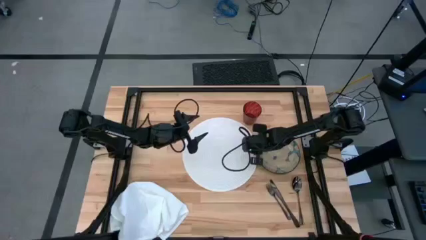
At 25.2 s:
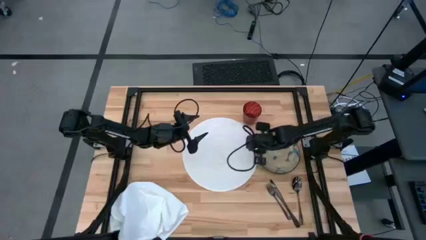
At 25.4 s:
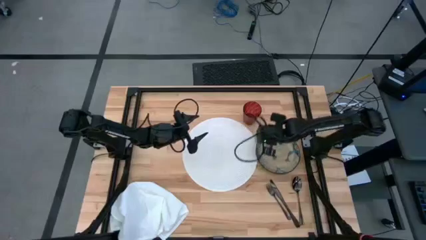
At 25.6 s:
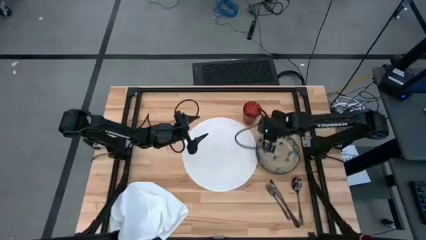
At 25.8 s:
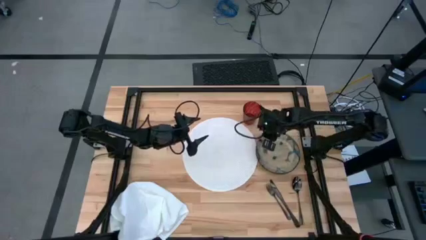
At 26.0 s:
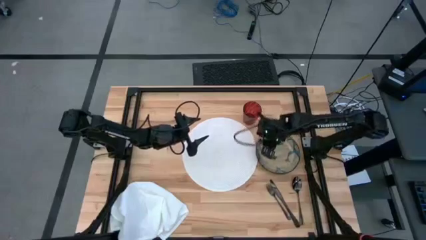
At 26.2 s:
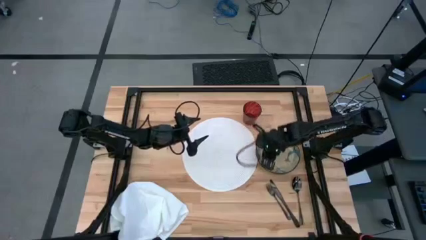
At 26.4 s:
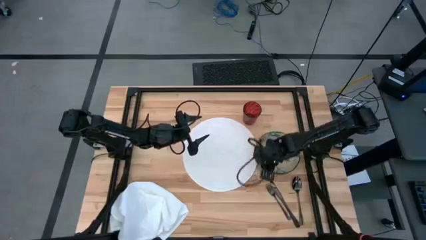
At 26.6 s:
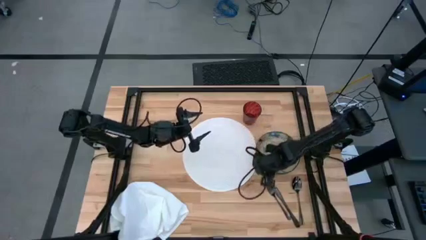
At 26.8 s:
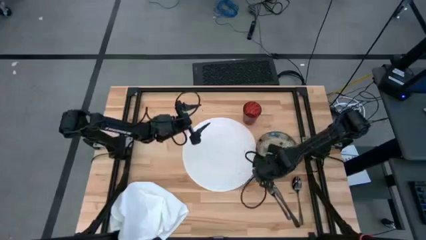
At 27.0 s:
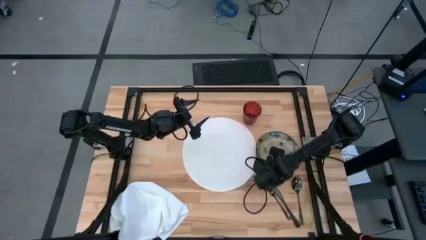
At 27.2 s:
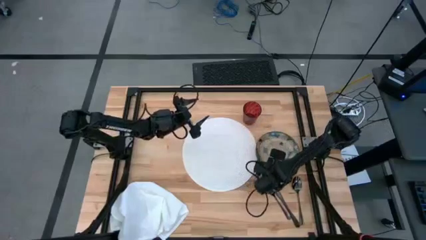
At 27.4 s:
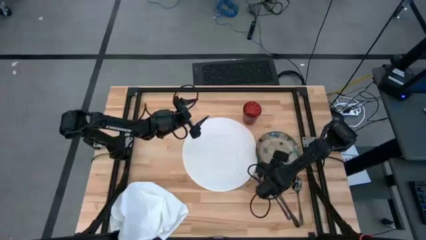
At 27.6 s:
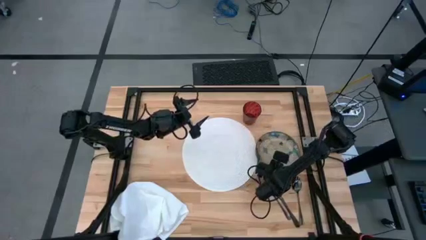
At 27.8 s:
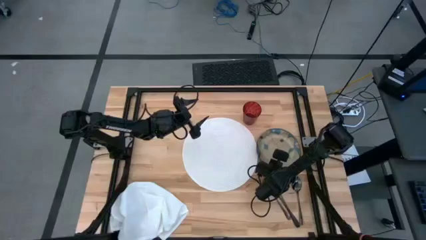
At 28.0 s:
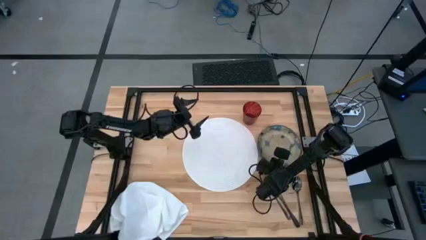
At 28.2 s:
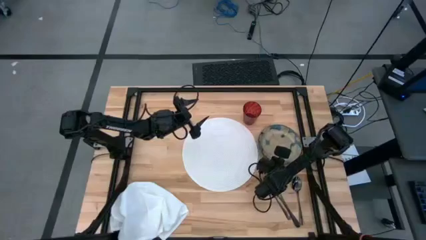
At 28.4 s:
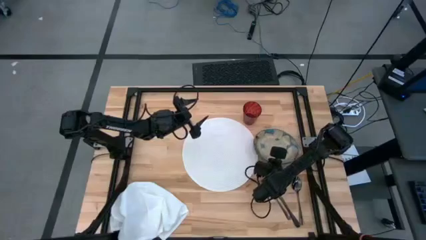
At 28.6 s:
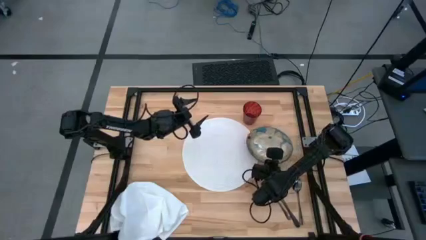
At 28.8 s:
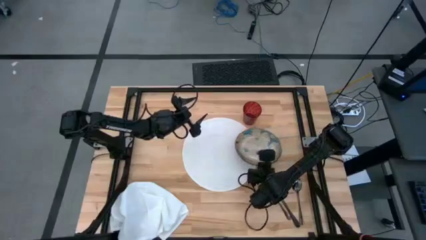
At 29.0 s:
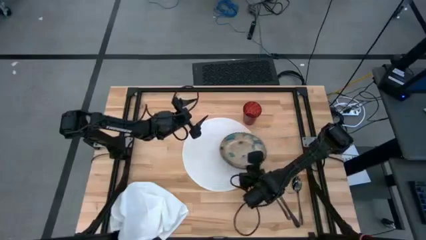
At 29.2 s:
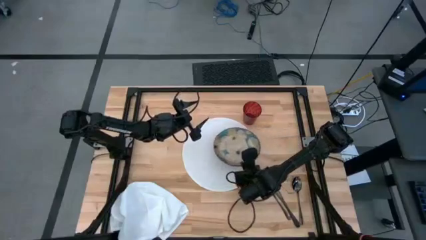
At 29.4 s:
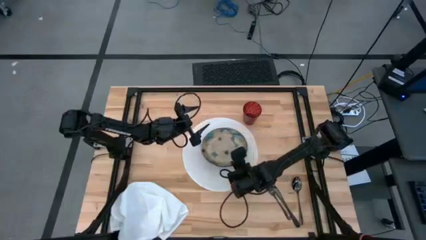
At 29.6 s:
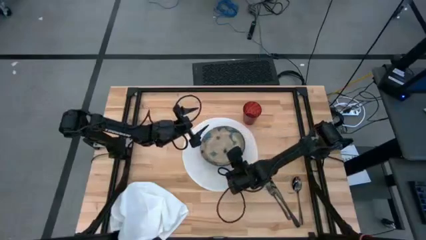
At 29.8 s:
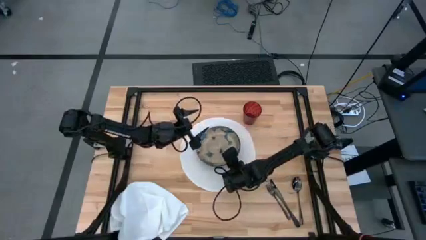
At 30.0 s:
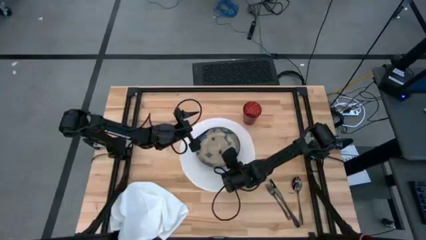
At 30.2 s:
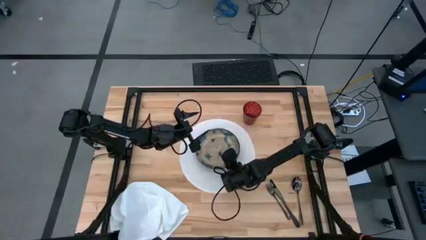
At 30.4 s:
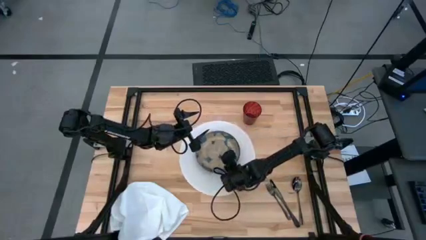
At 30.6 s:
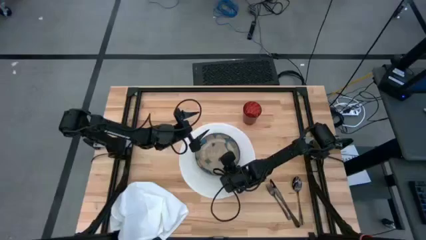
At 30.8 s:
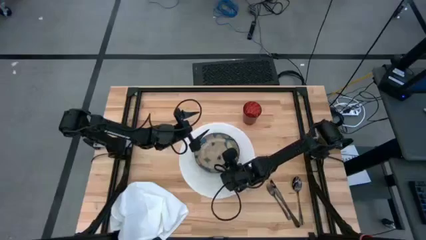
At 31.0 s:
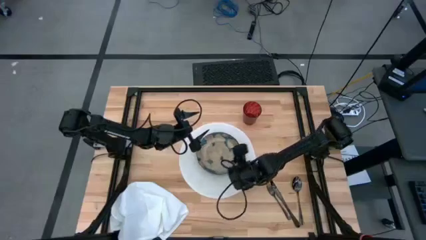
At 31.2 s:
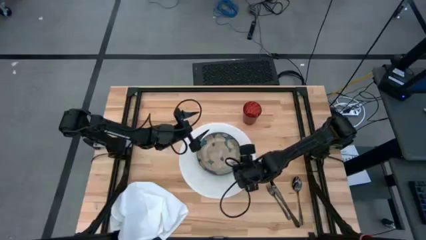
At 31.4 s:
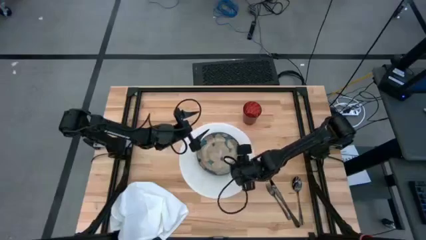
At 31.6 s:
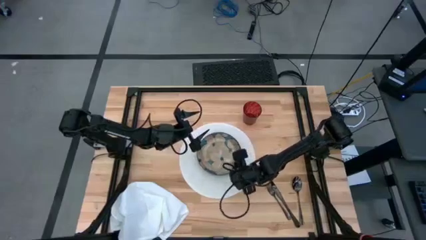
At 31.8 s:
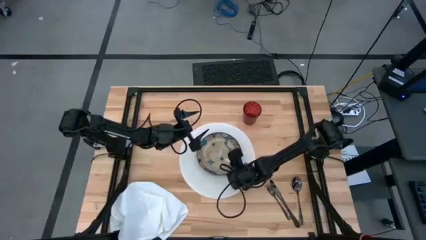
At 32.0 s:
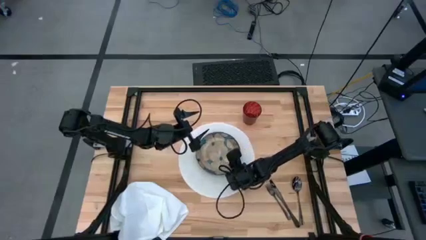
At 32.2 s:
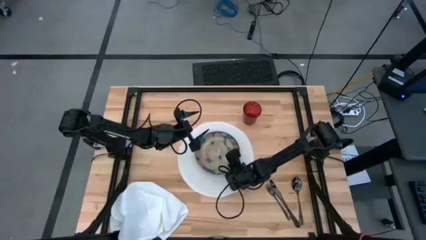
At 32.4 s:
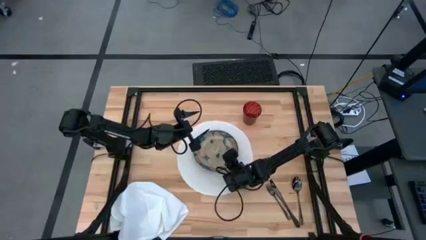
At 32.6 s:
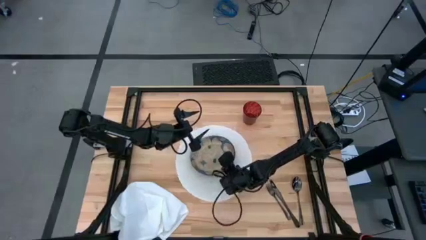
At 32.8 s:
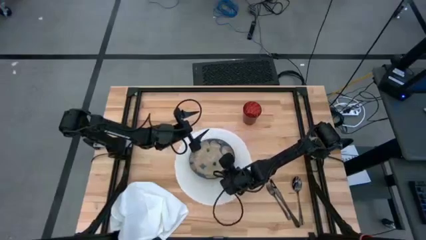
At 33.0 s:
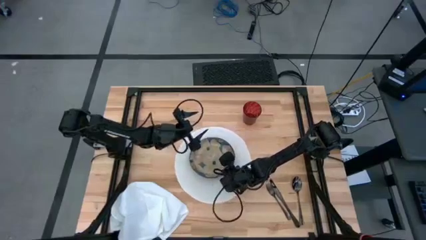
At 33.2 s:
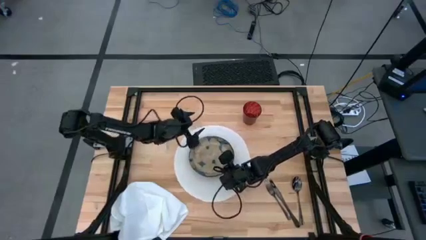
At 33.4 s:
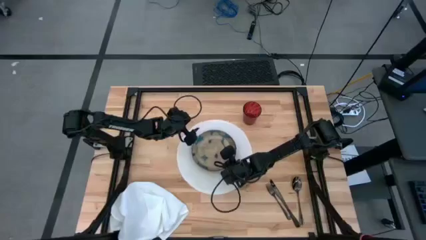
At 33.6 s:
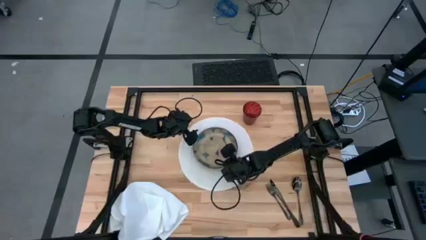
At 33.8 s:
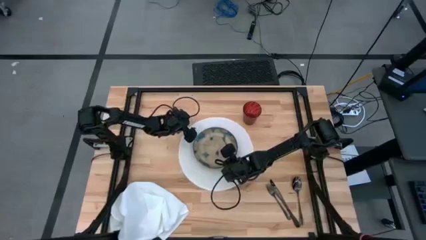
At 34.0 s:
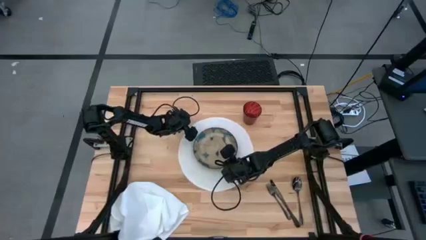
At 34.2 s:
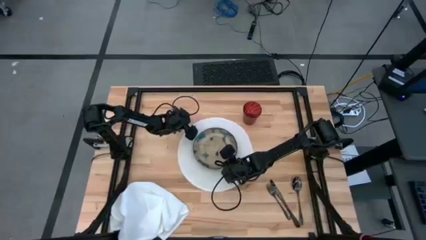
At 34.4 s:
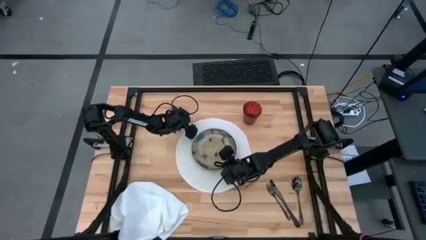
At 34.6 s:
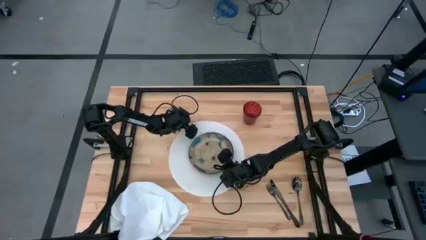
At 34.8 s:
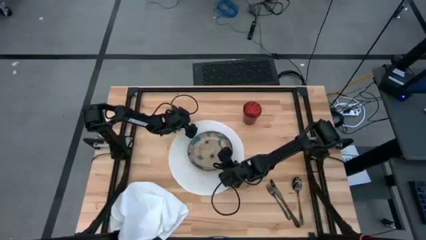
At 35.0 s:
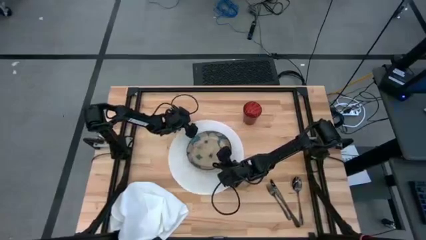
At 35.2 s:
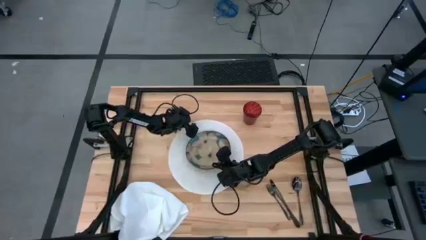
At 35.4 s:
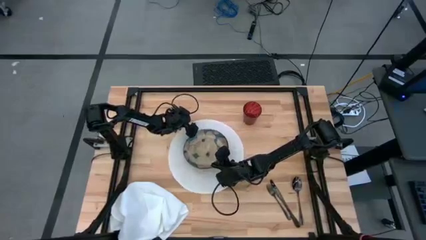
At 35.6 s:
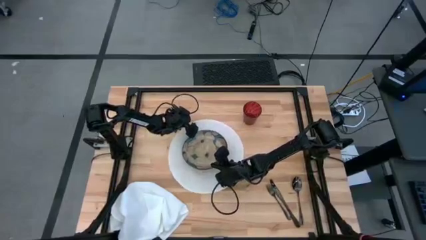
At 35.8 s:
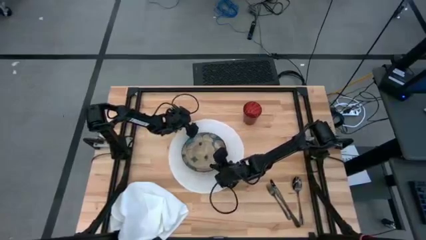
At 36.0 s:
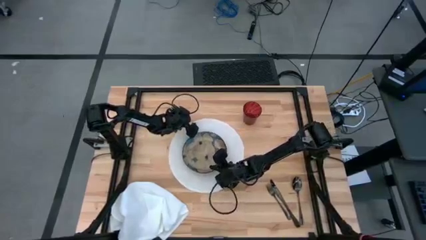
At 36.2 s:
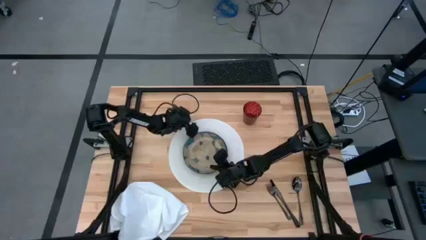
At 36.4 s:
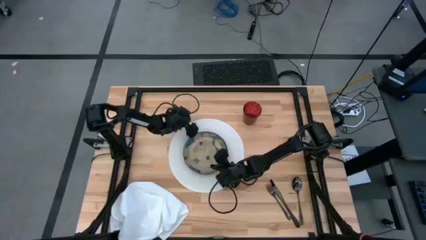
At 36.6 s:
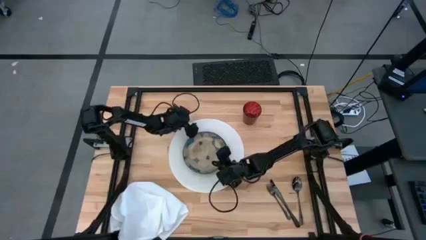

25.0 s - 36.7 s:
Task: Set table place
Put the decorated ceramic plate on the placemat

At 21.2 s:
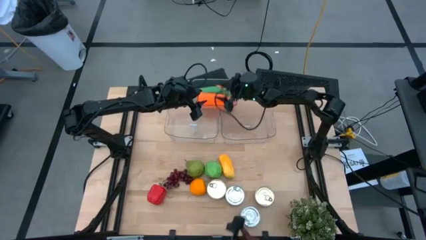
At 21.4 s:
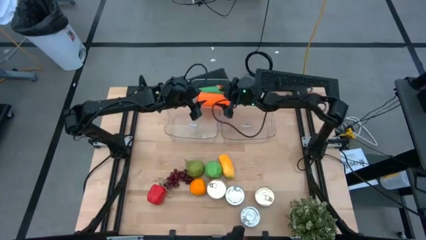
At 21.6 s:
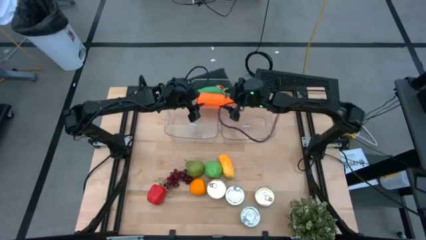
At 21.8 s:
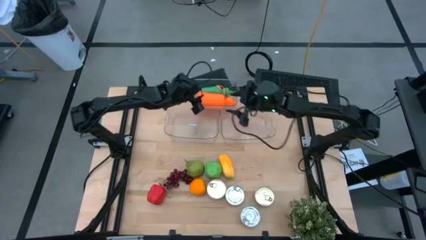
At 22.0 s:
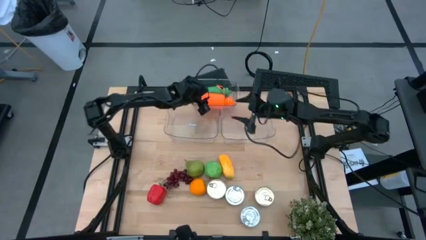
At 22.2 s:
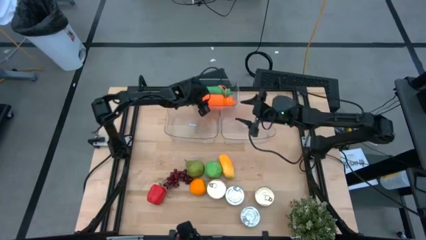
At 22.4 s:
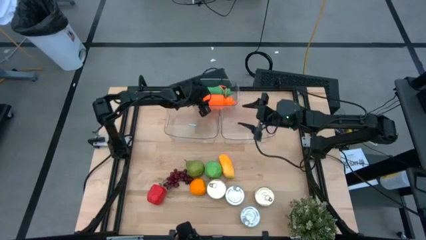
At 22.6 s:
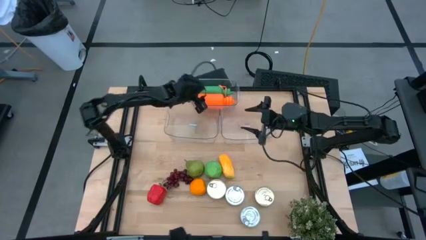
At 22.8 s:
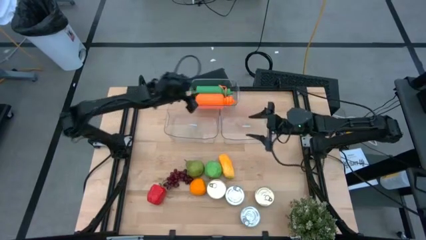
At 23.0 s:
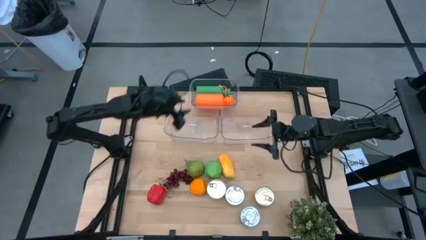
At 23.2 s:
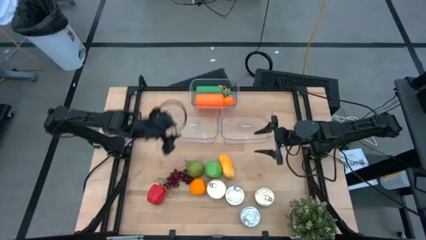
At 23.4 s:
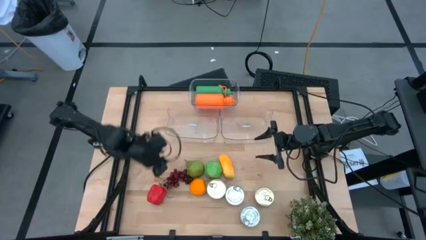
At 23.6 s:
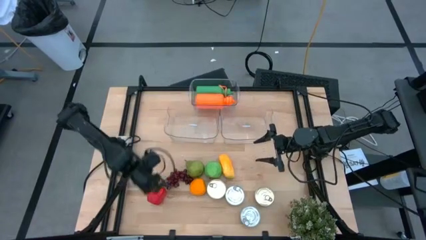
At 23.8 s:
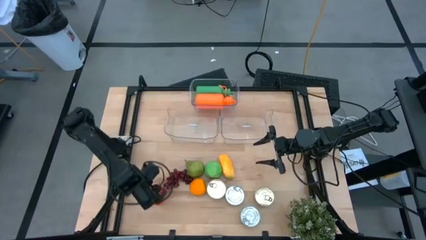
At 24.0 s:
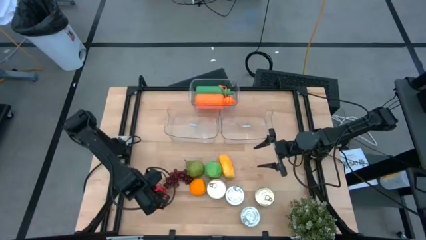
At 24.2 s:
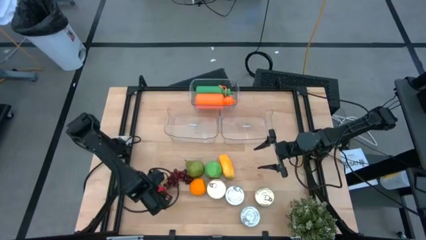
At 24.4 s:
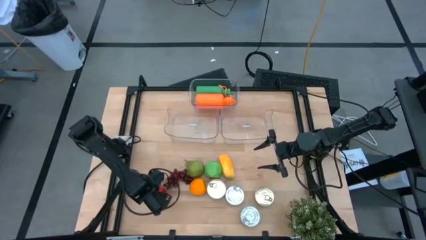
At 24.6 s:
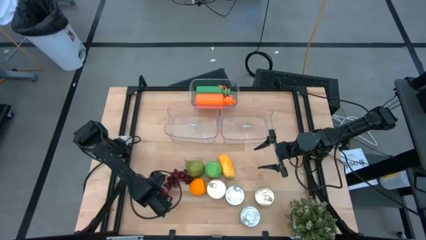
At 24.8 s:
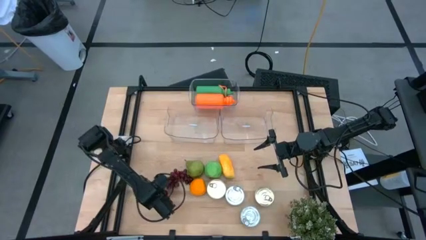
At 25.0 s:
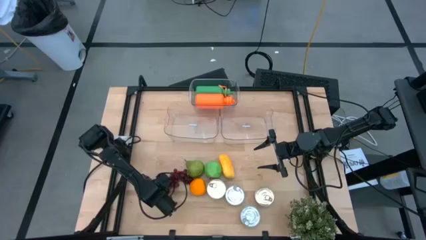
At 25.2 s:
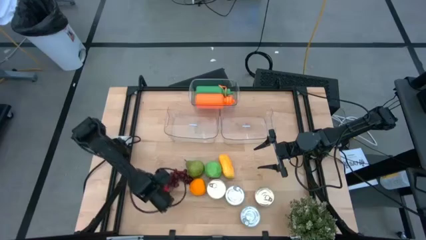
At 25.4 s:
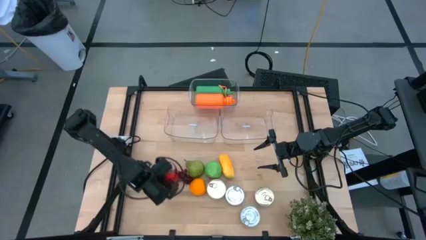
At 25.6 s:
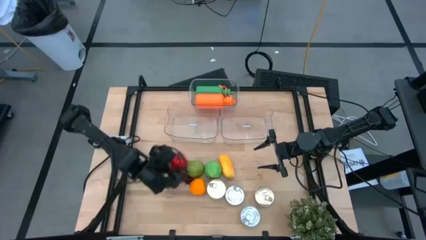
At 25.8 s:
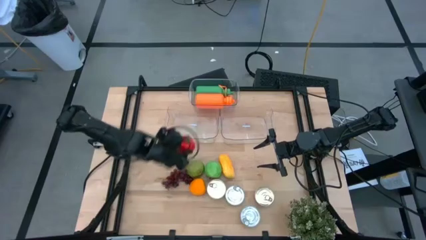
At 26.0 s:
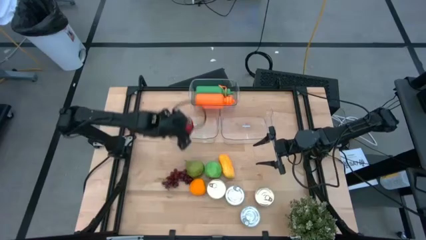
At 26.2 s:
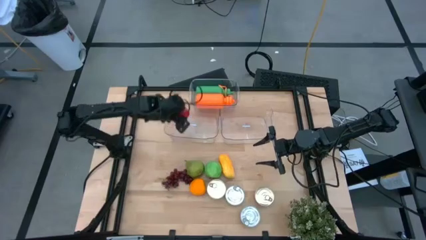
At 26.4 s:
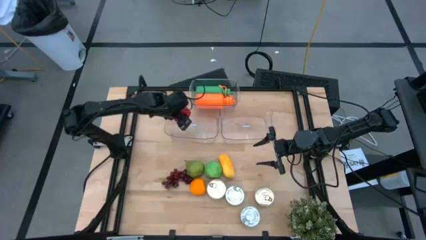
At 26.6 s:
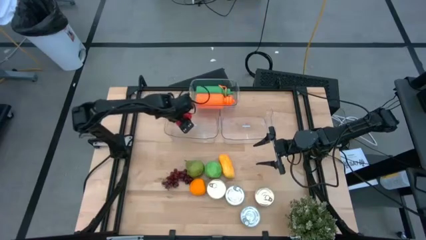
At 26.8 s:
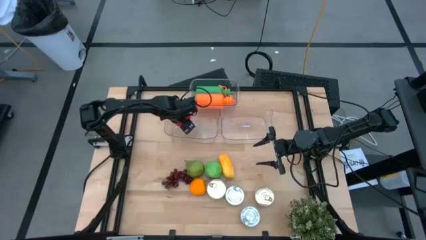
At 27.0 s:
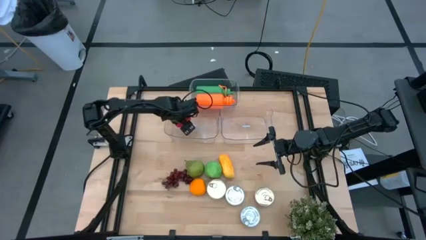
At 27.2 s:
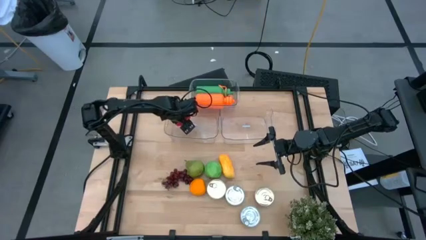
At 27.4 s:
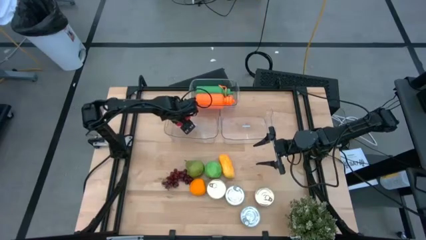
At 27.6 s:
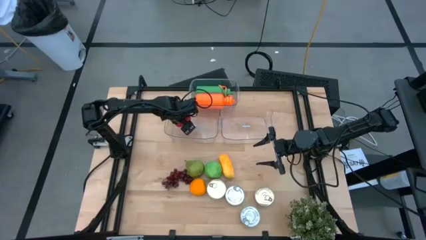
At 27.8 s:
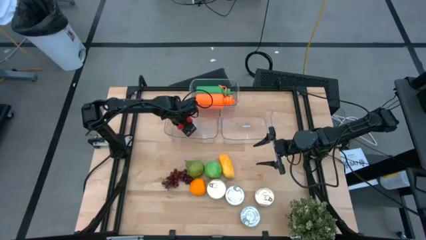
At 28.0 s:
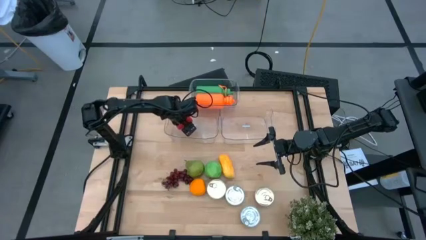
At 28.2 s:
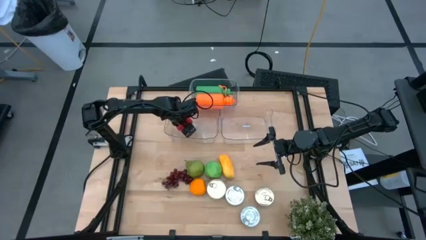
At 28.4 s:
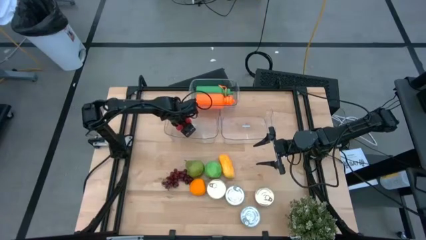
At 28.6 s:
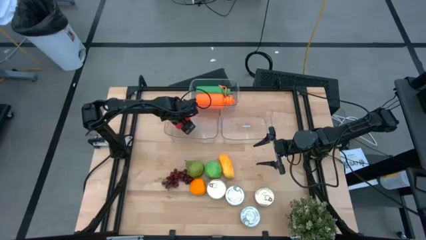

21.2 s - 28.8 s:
Task: Pick & Place Food Item
Put the red bell pepper into the bottom left transparent bin
